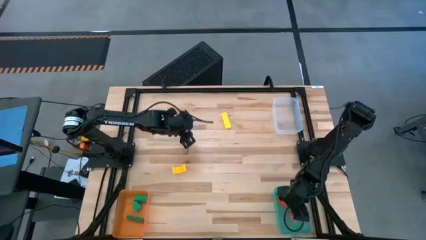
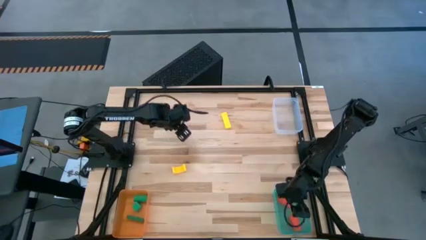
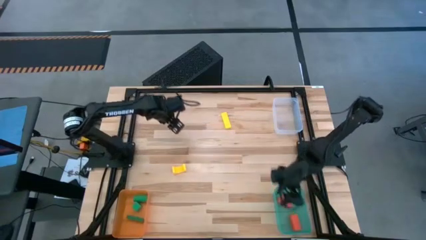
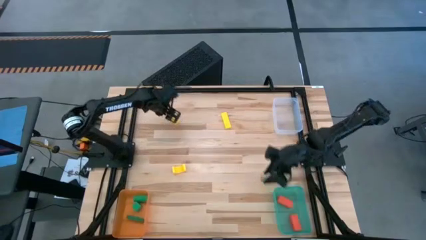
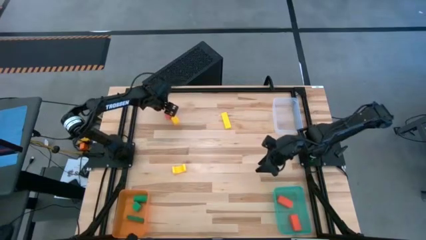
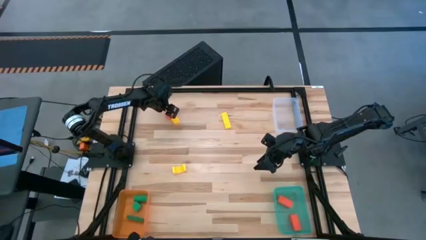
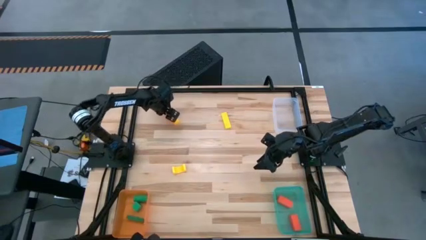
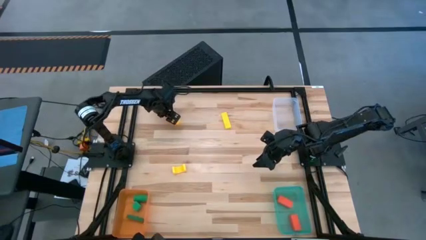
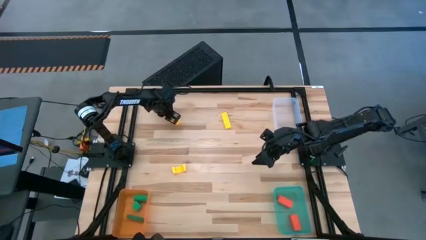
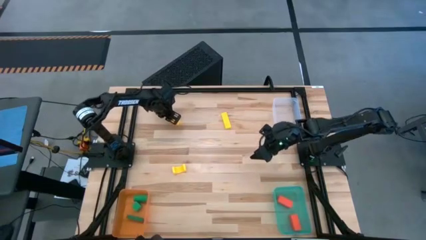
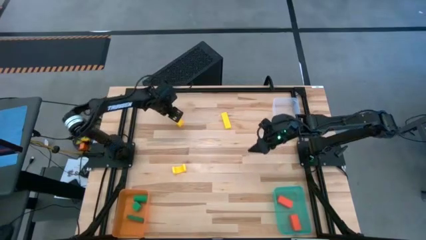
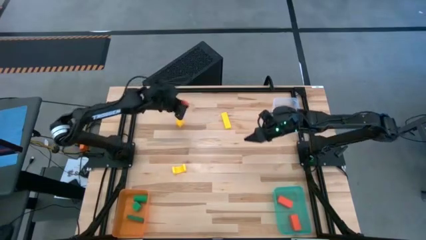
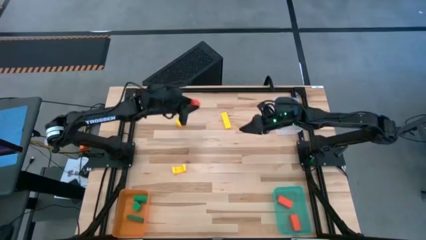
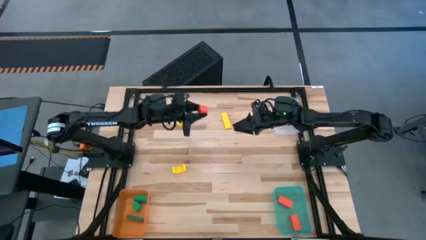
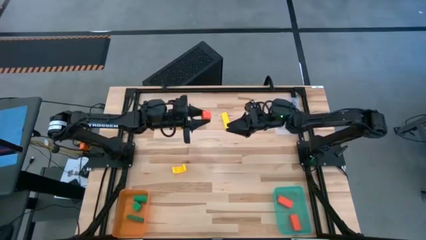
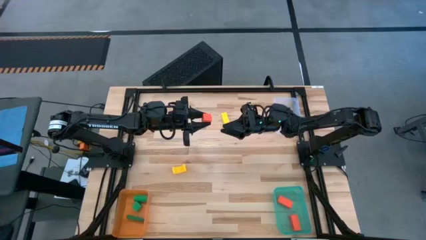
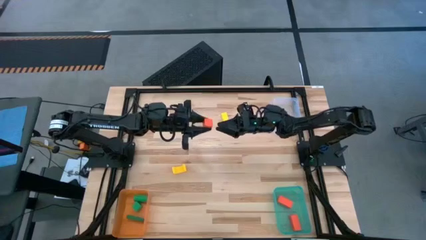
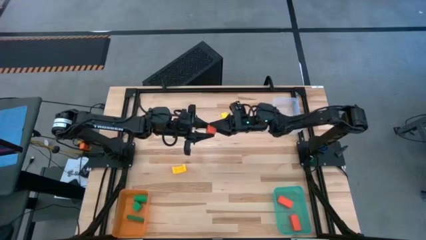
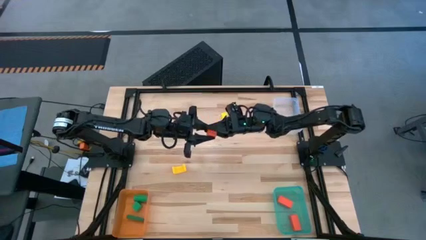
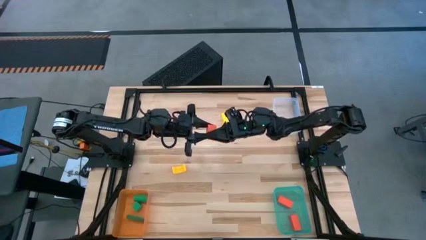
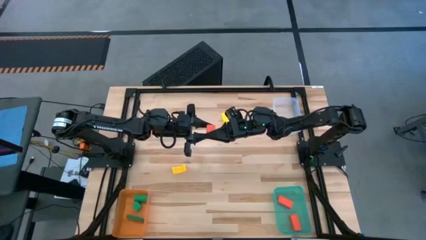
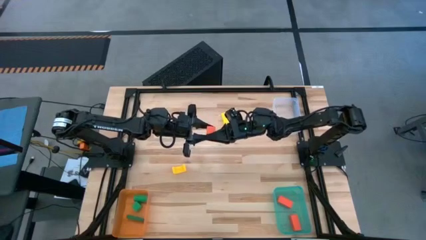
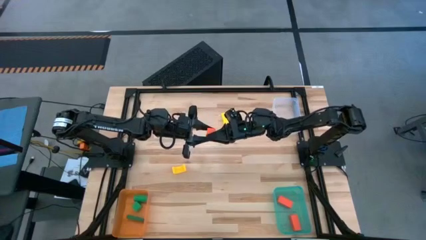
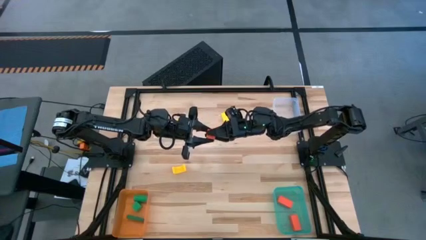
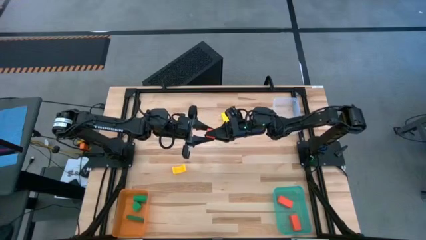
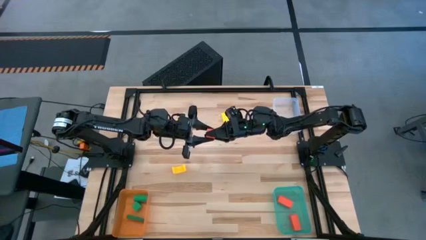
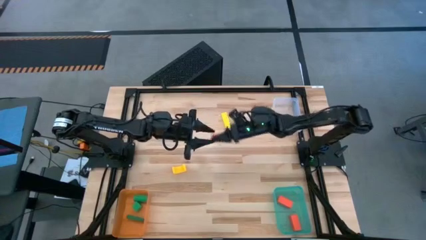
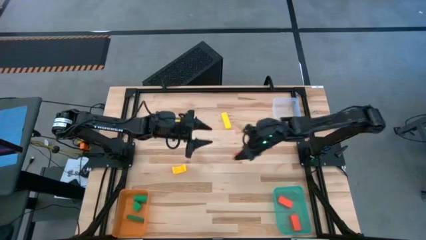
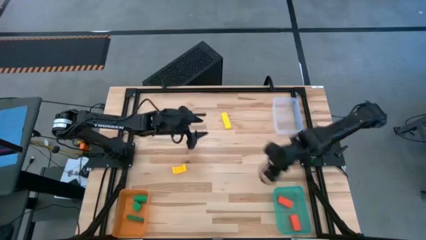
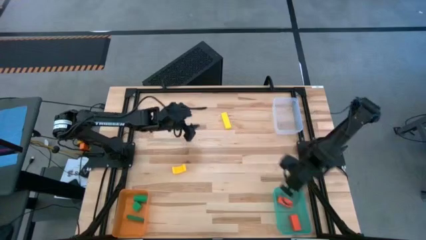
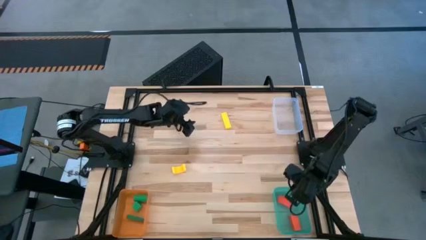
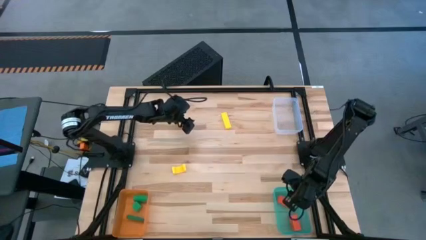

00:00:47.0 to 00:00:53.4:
Task: Sort & place blocks by color
Put the orange block into the blue bin

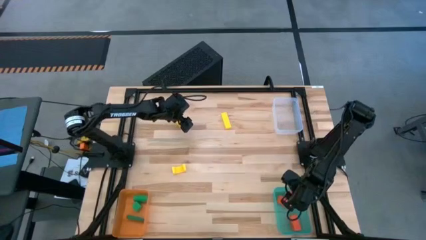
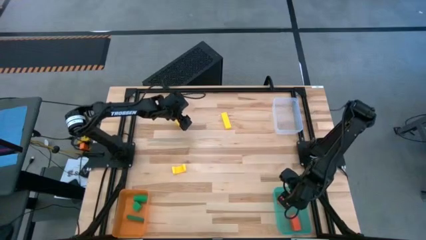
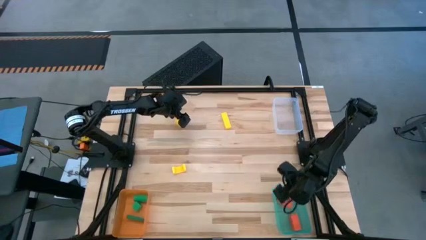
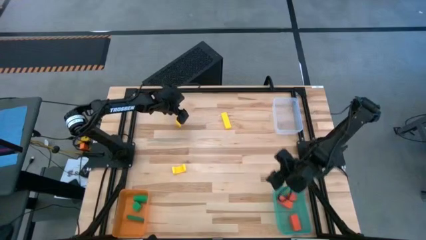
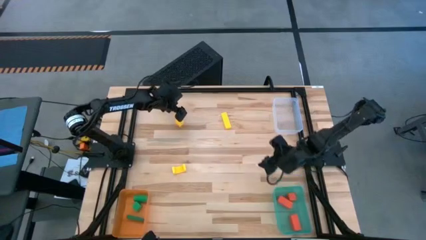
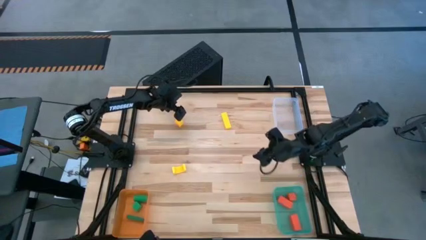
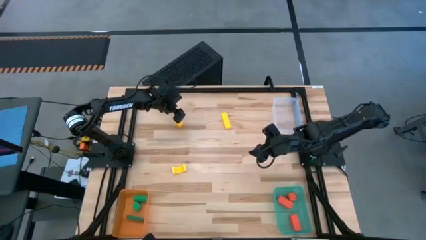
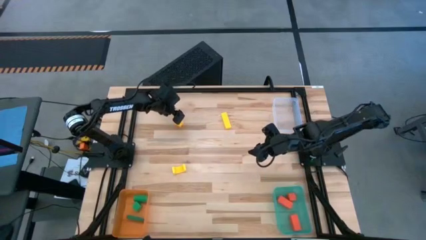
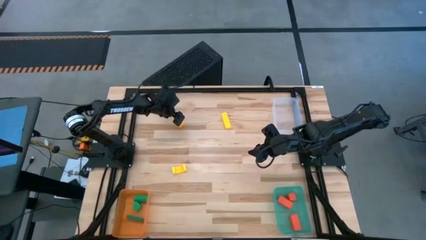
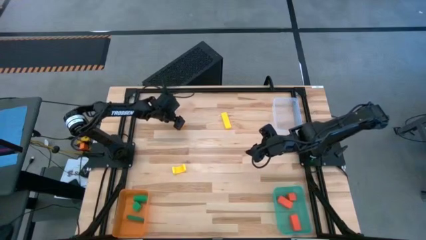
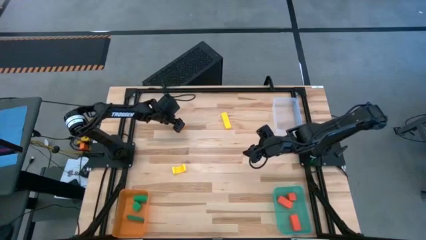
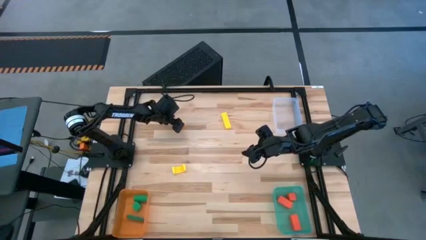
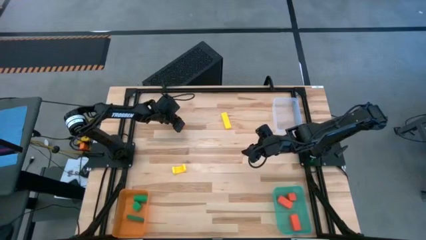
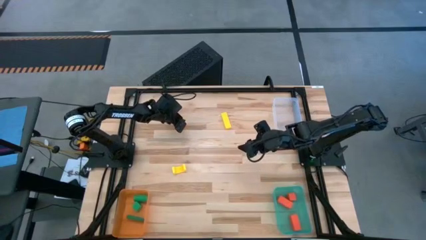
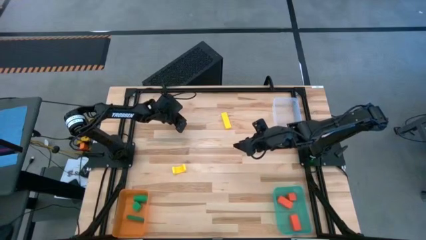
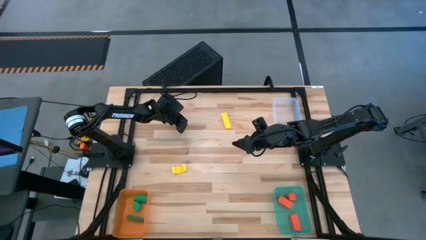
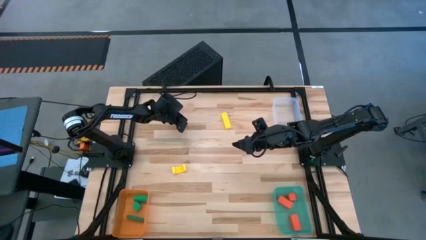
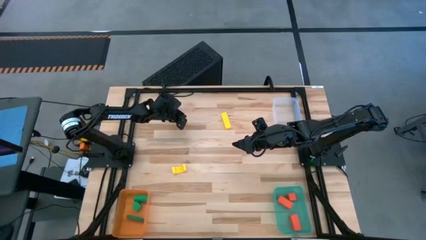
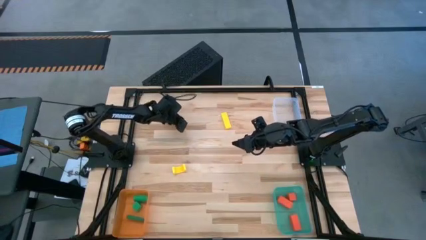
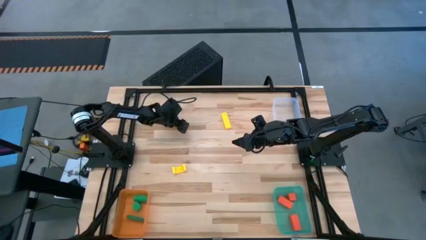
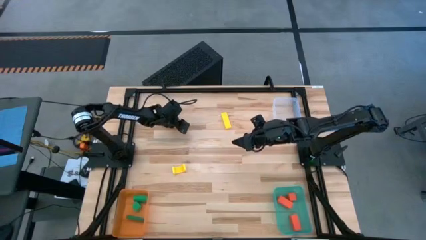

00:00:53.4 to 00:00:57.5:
Put the top left yellow block into the transparent bin

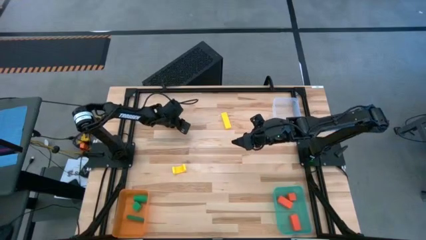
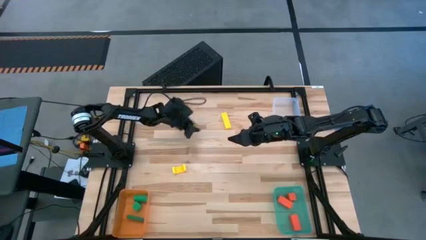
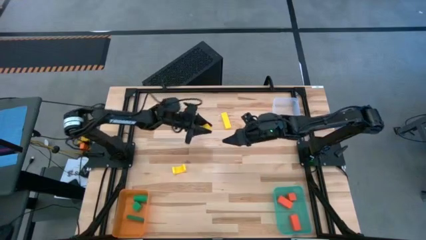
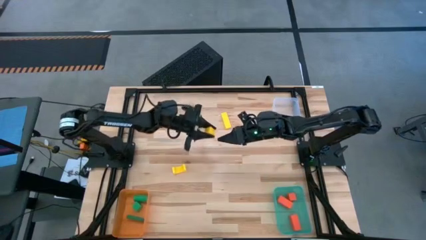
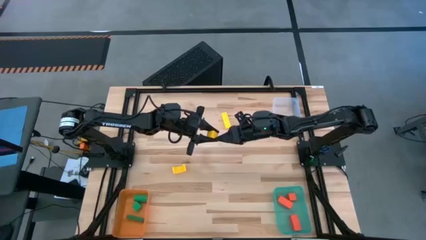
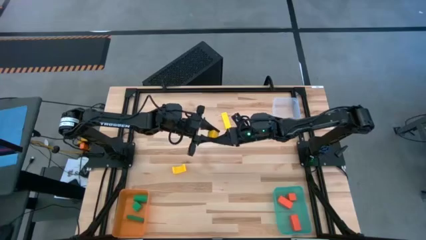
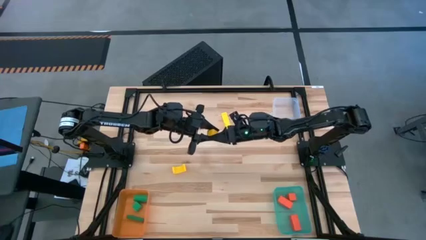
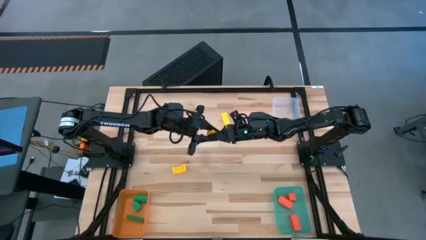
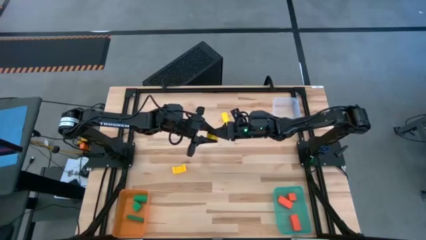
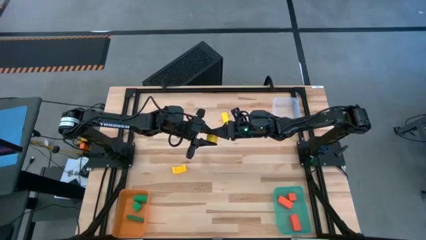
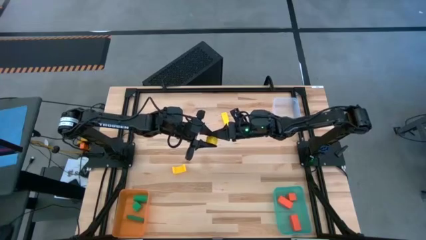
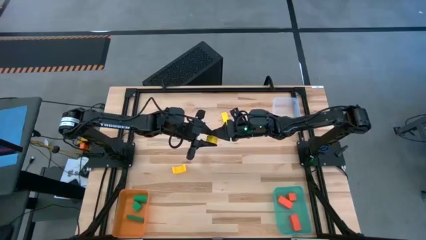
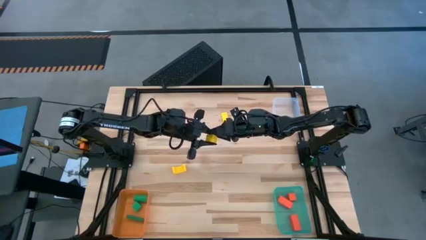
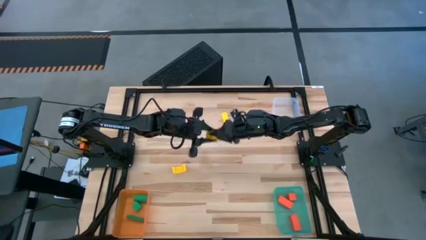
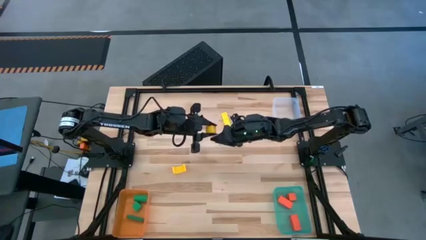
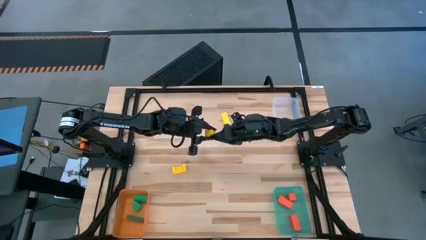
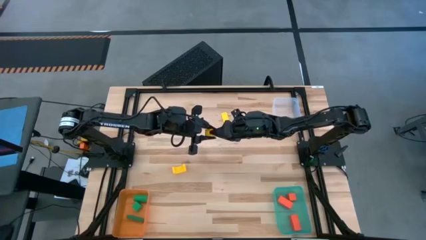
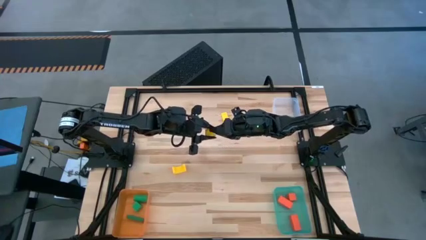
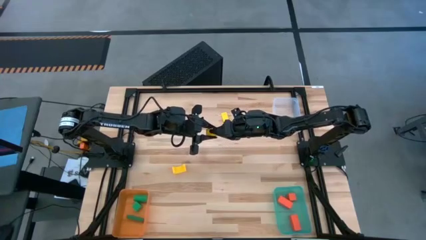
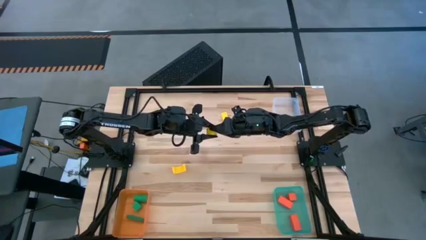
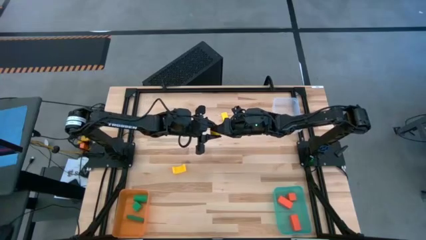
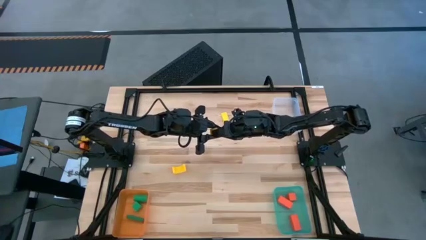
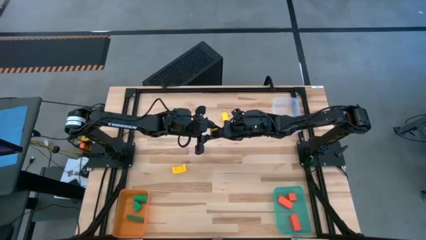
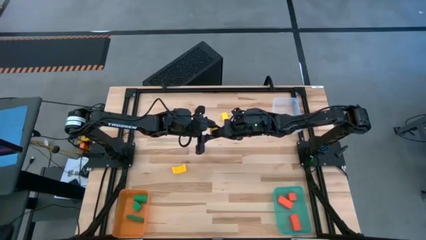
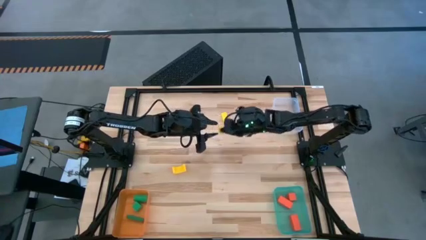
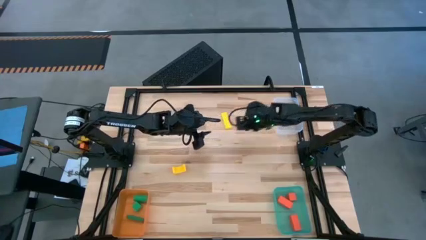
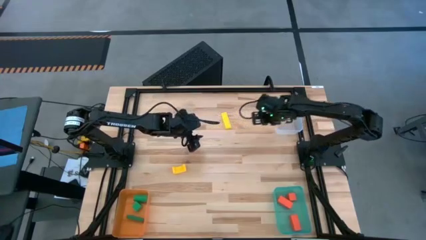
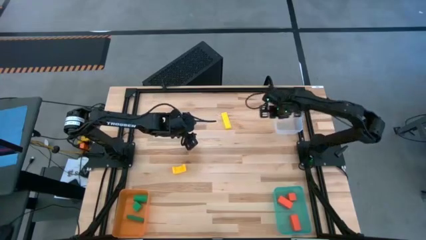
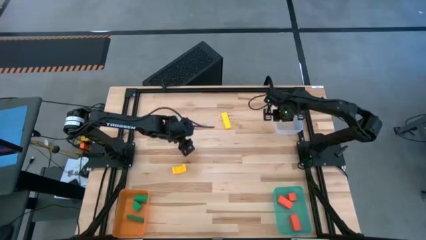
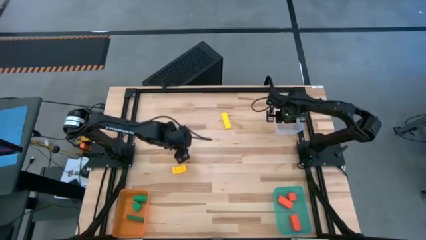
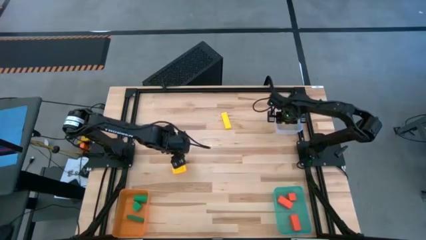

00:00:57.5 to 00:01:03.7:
Put the top left yellow block into the transparent bin
